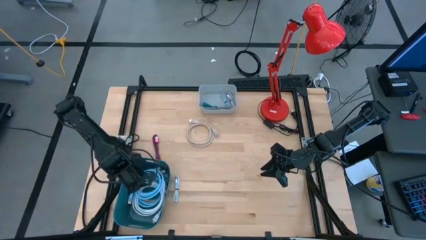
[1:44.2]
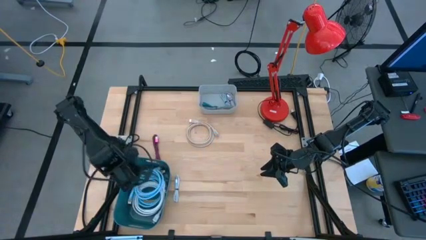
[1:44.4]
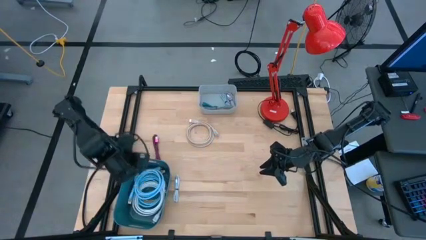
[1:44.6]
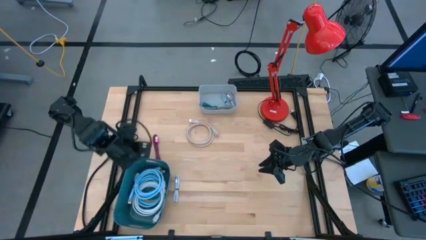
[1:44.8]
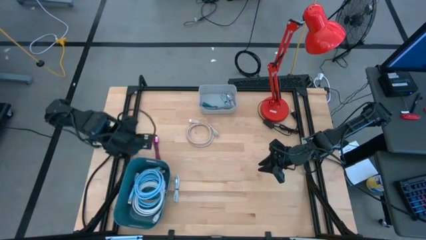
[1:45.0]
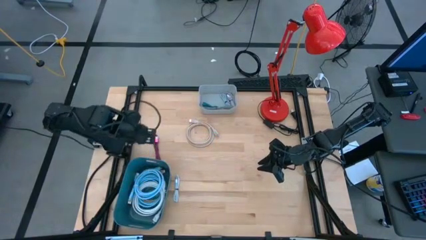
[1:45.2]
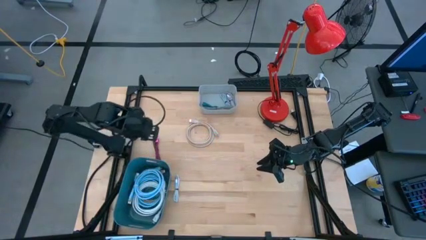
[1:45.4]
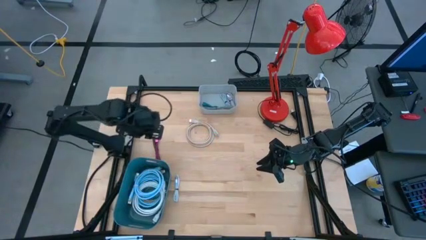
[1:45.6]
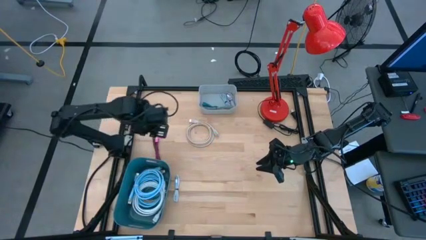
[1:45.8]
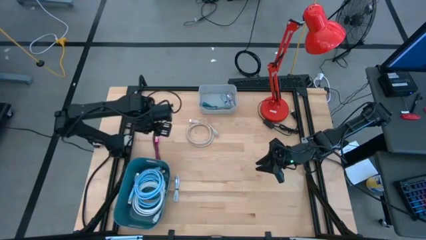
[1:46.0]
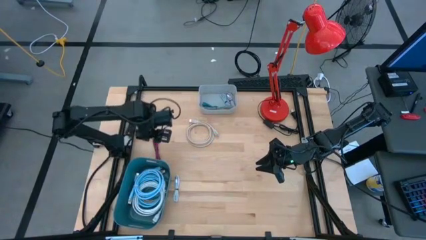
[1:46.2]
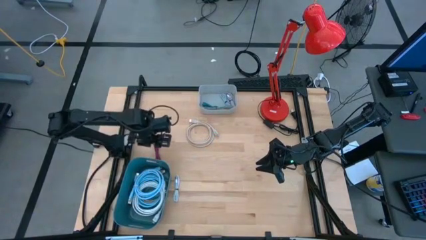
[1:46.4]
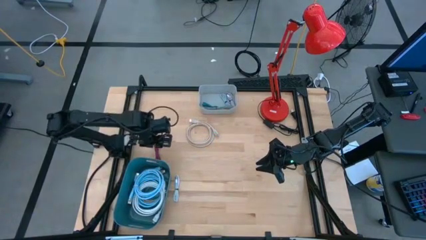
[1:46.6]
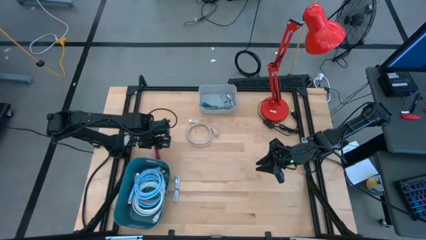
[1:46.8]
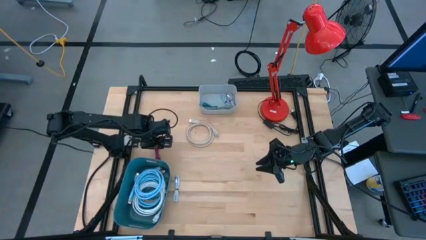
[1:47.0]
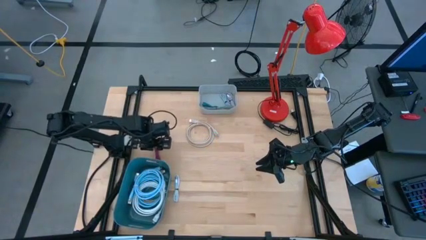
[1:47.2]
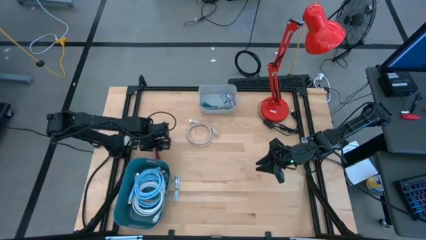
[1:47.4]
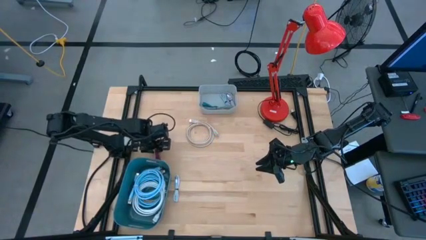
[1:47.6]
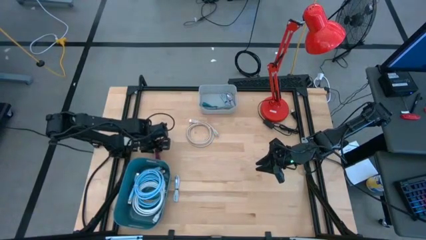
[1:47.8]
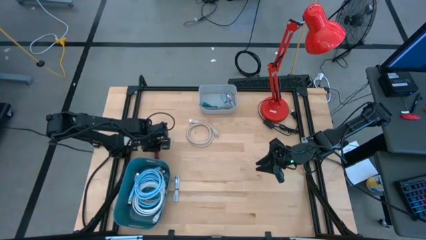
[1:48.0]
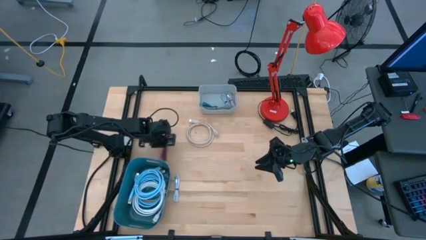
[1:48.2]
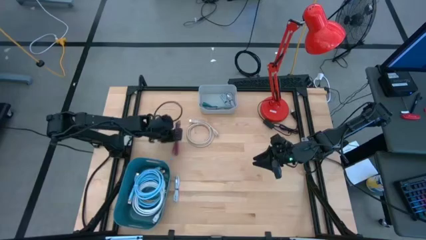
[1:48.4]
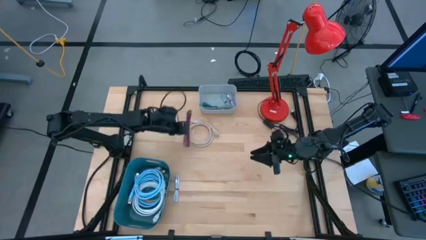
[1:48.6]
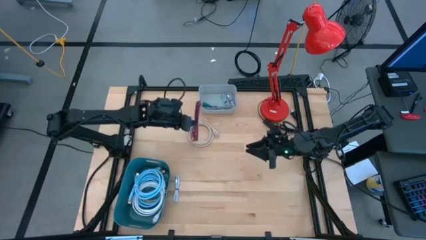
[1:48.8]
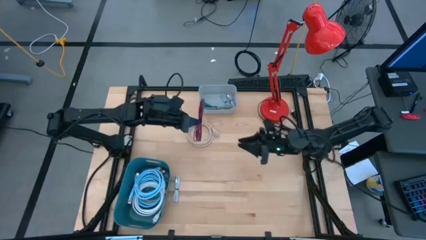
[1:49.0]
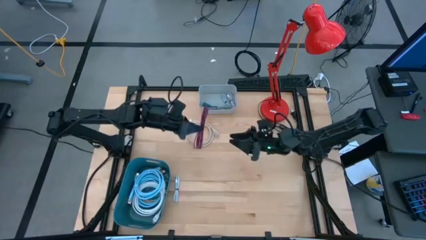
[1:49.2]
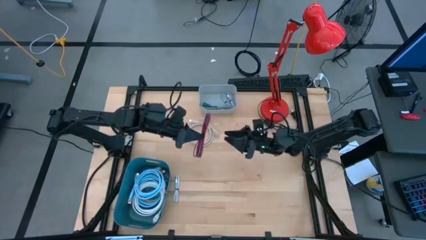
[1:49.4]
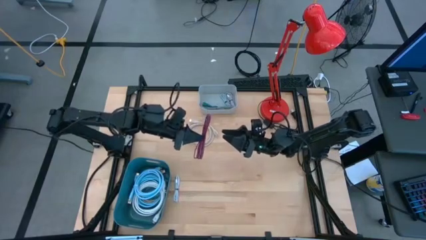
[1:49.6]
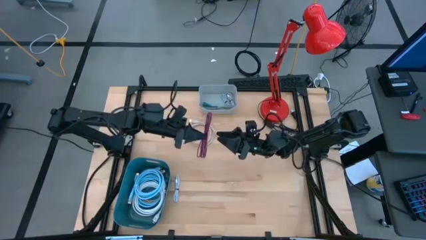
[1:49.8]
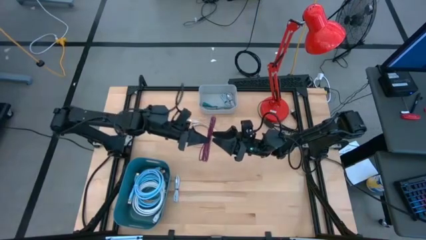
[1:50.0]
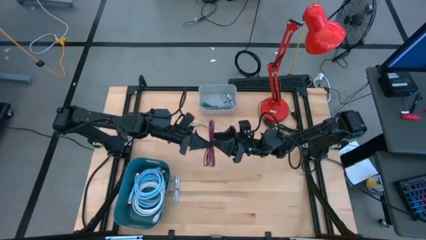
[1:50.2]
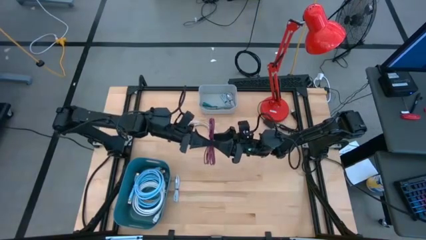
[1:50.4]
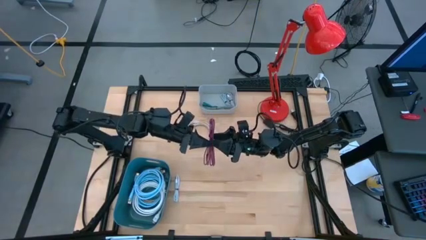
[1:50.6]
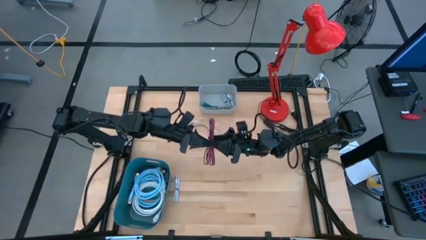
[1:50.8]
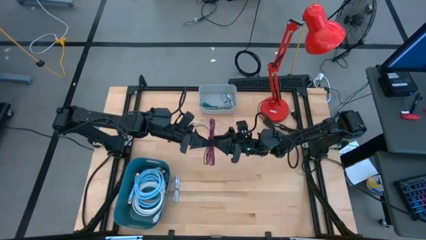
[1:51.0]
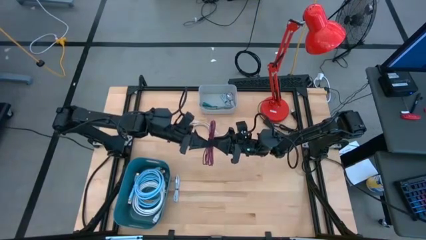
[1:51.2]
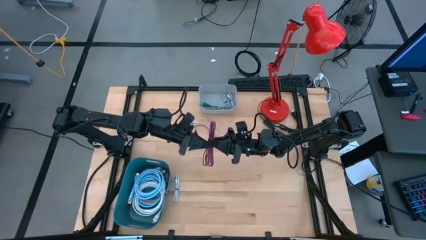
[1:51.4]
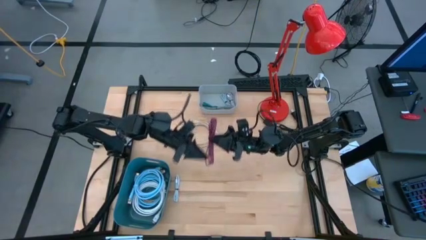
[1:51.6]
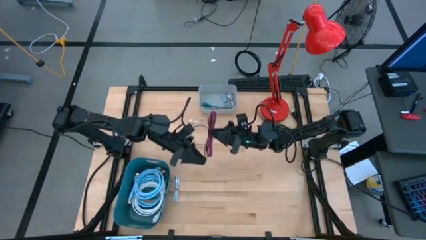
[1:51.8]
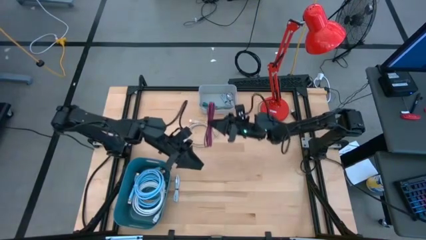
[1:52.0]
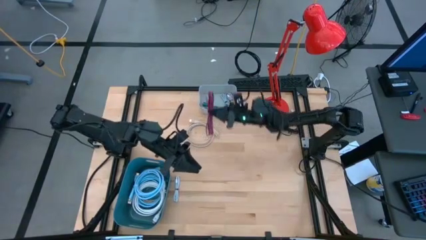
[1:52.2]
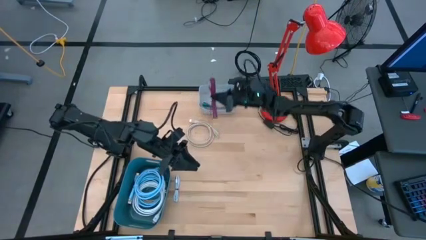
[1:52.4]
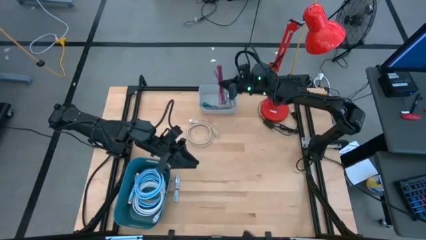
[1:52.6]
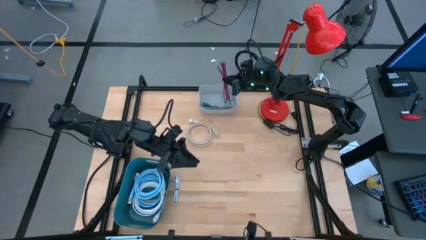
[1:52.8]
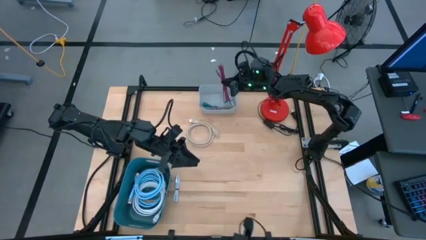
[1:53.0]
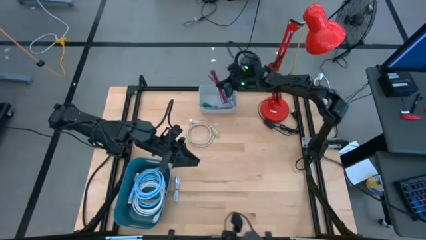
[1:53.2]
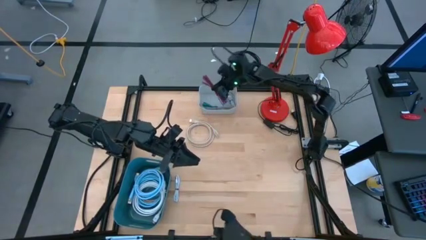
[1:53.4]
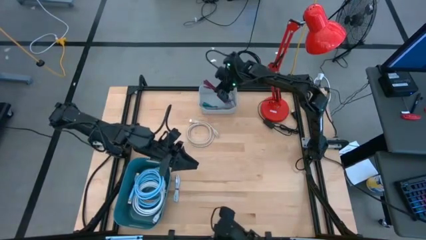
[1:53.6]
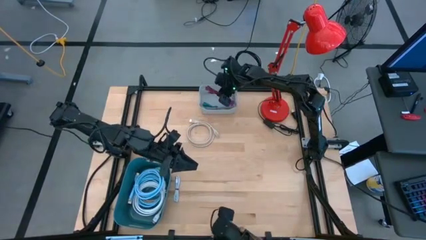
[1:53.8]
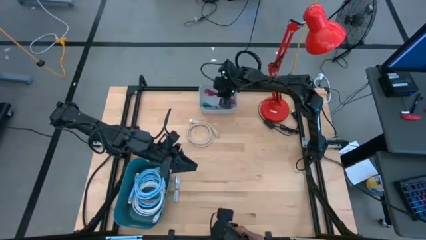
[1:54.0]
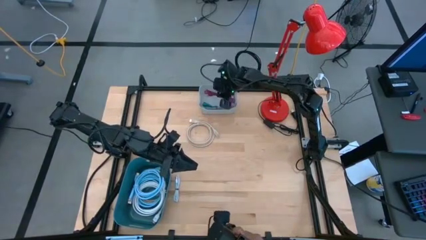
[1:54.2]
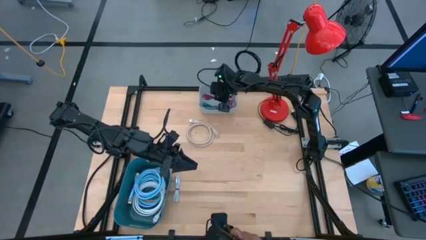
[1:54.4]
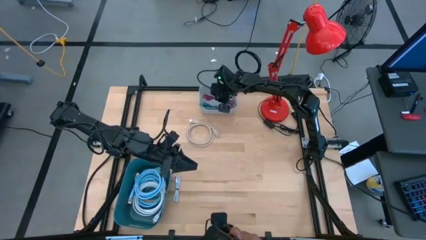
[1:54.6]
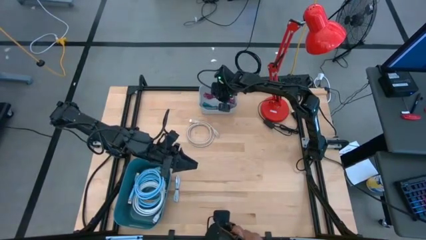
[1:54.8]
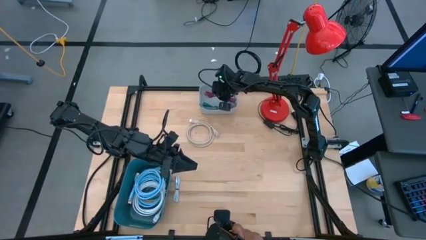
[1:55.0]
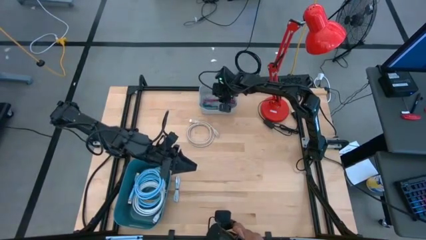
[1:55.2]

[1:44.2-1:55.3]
Task: Pick & Place USB Port
Put the black pink charger cable into the gray bin

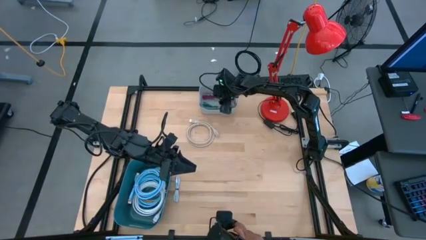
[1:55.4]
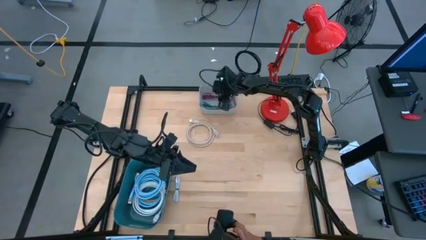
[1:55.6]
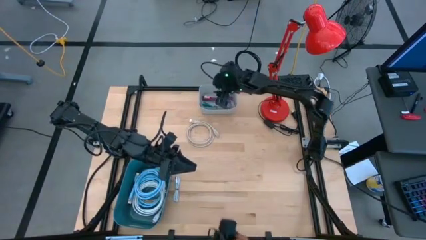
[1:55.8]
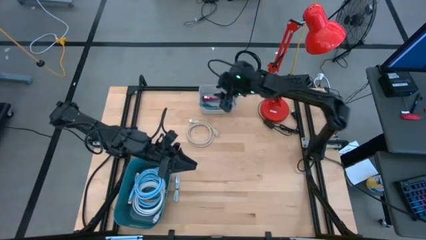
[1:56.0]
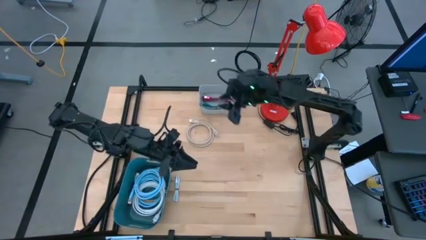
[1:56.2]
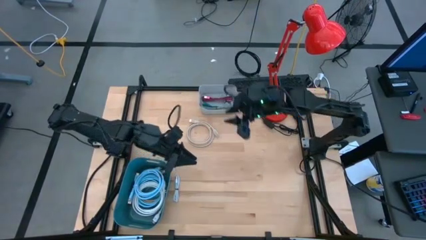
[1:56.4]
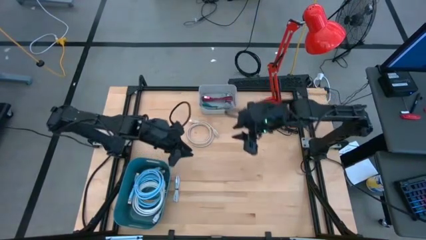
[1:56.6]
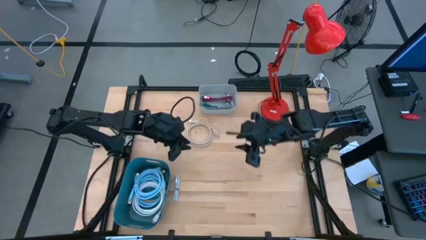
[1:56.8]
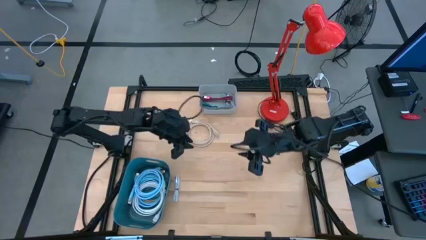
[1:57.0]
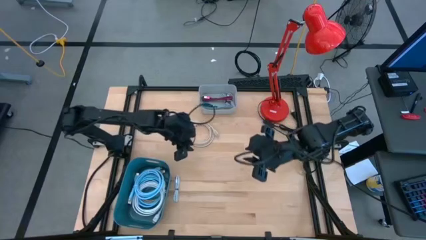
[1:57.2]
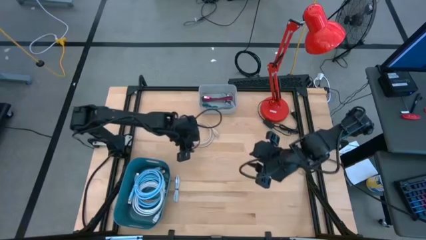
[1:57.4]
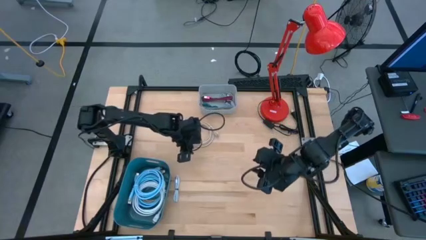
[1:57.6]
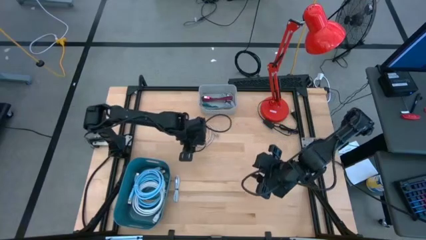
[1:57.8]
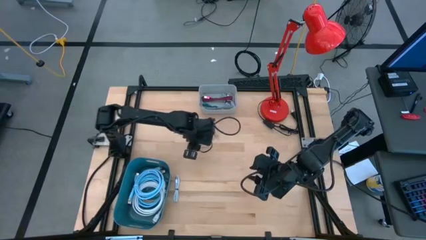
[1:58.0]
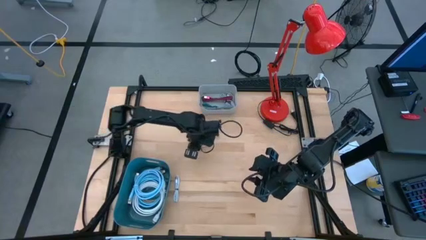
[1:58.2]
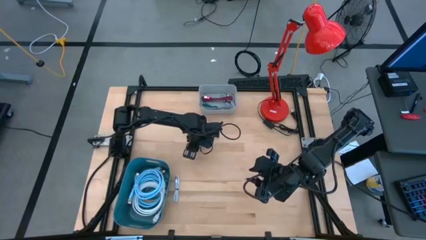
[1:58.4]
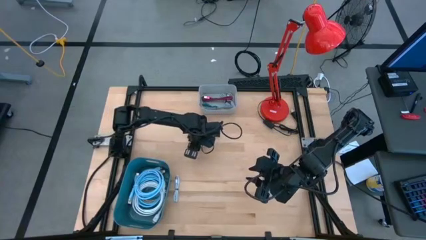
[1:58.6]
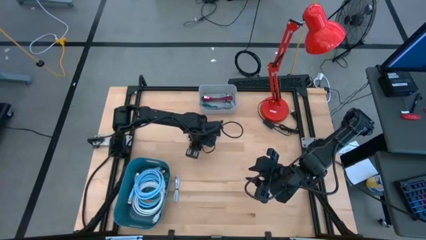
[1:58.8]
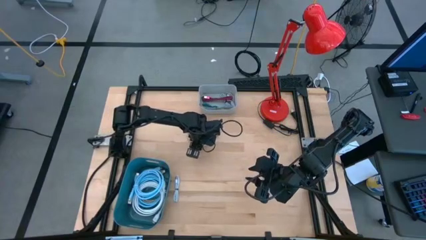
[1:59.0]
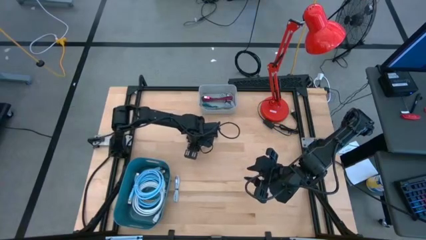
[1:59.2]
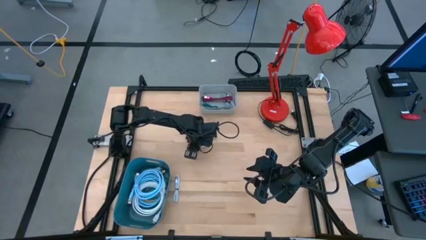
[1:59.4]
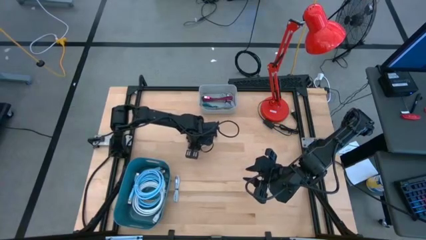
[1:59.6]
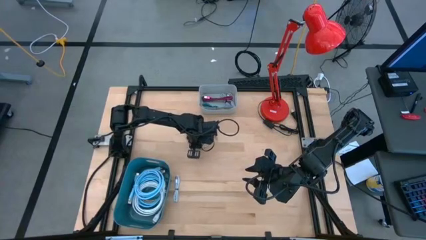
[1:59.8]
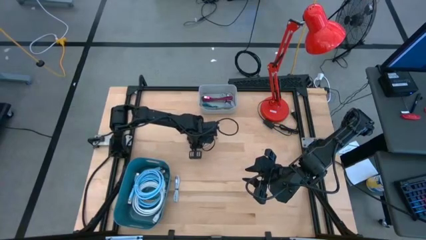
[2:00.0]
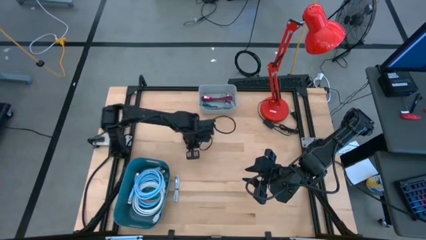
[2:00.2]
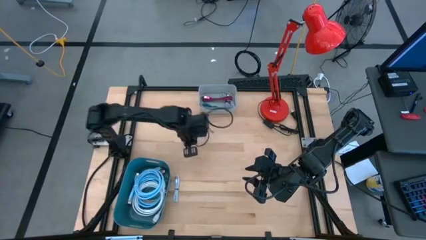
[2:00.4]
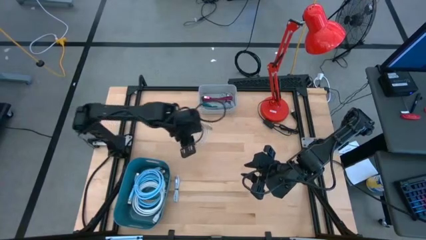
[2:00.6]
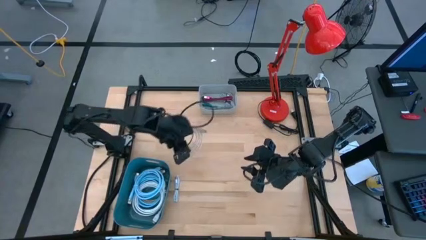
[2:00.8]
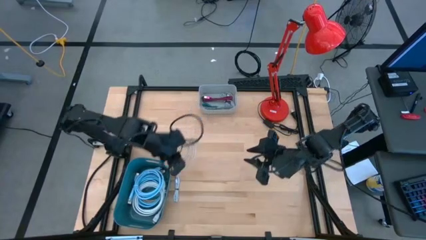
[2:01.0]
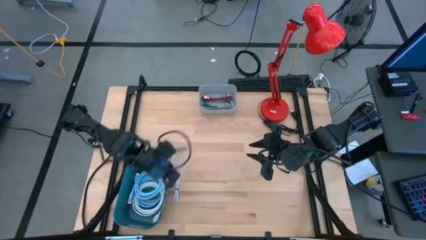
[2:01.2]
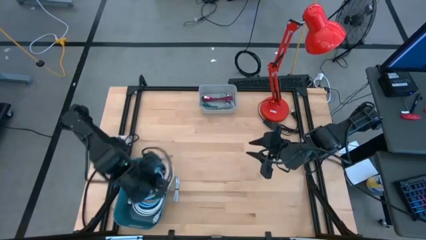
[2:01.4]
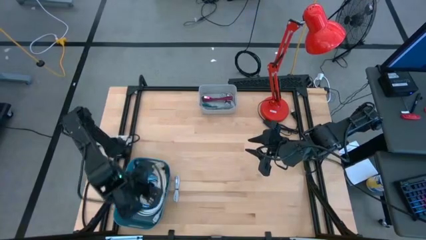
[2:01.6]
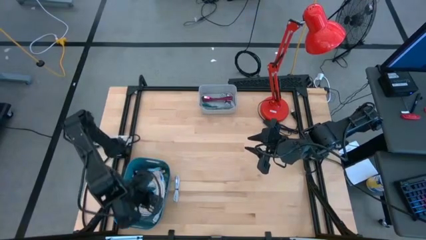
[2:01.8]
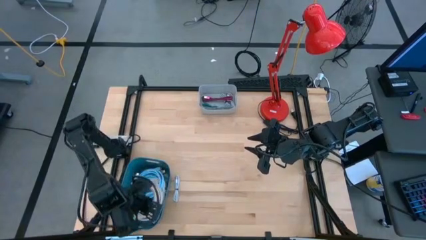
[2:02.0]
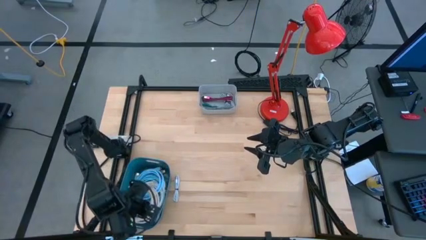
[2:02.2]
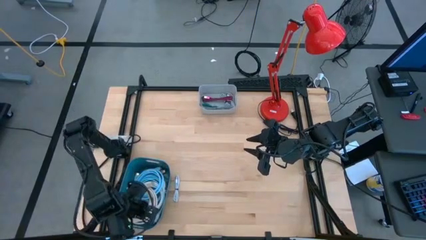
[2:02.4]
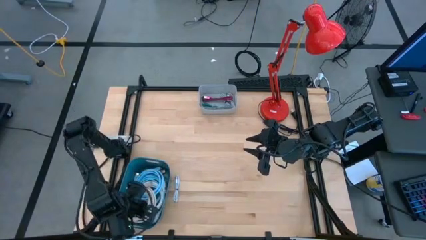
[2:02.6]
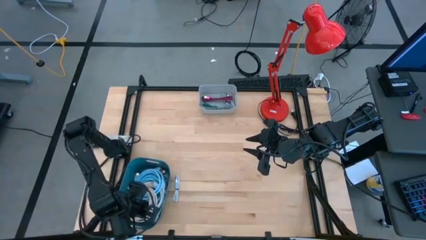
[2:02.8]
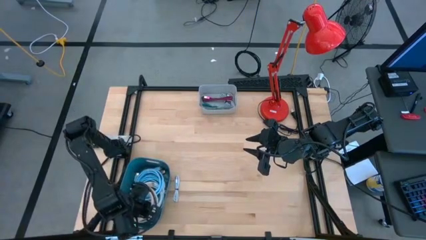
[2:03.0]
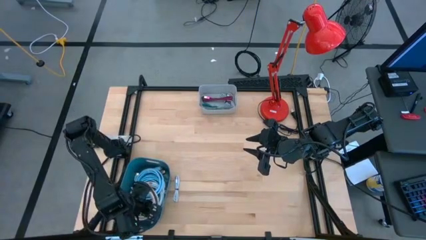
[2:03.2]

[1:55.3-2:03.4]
Put the brown HDMI cable into the blue bin
